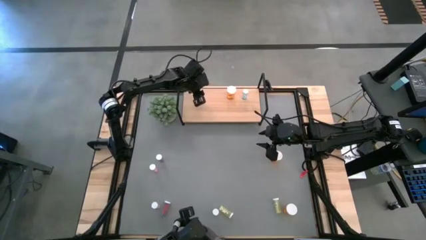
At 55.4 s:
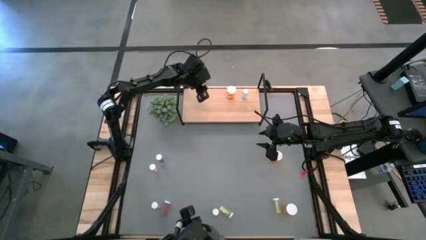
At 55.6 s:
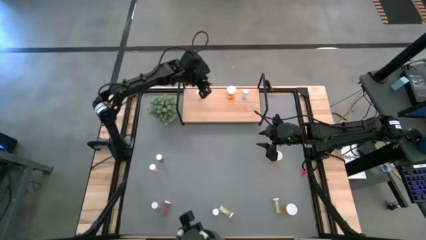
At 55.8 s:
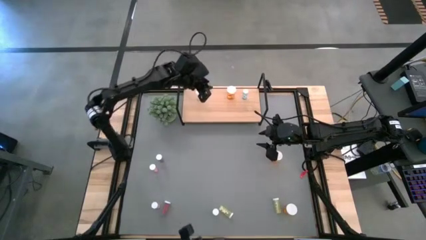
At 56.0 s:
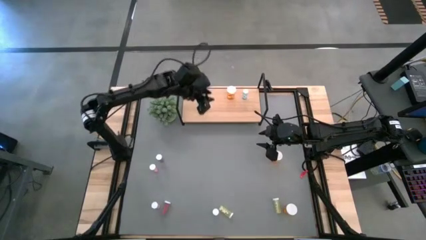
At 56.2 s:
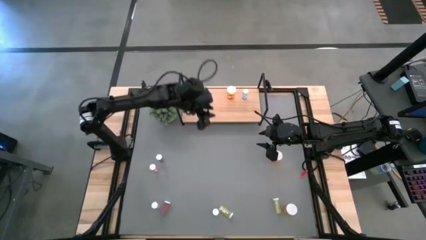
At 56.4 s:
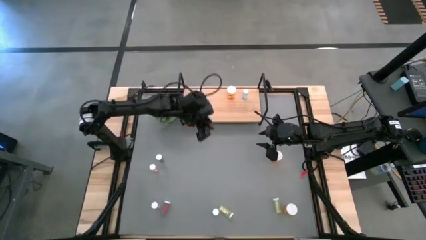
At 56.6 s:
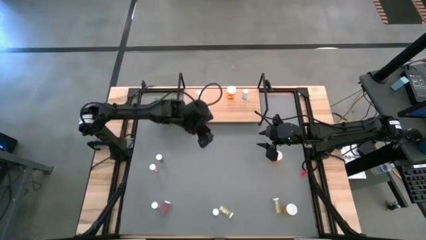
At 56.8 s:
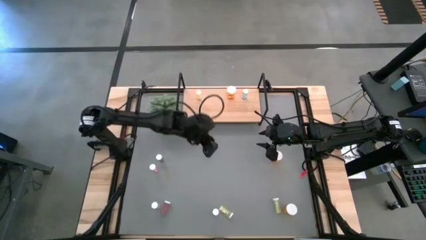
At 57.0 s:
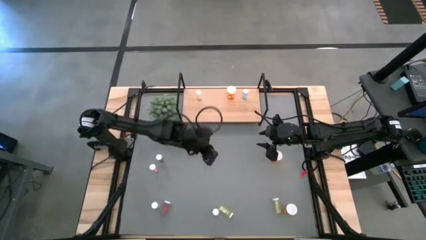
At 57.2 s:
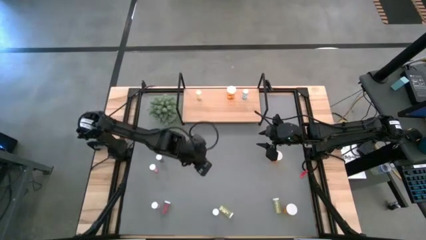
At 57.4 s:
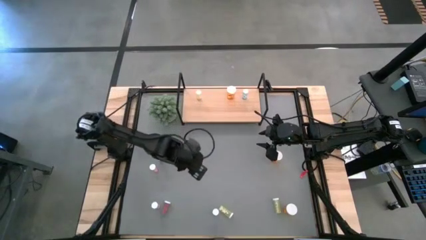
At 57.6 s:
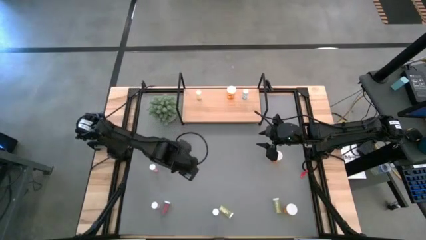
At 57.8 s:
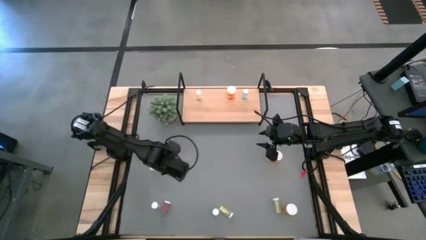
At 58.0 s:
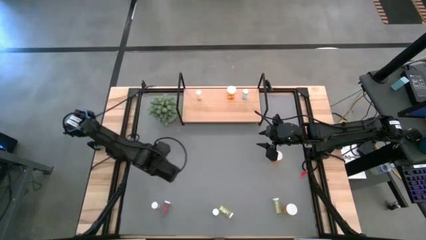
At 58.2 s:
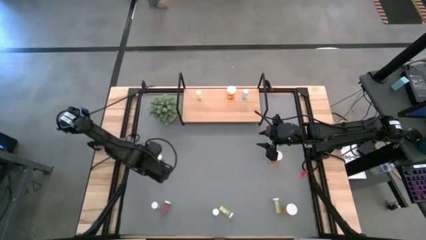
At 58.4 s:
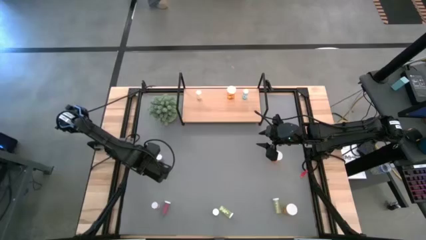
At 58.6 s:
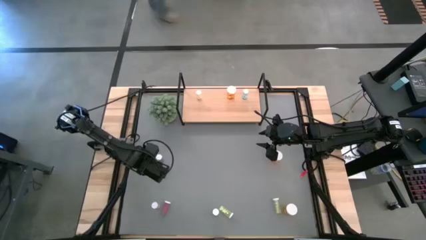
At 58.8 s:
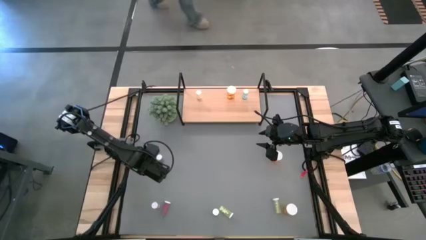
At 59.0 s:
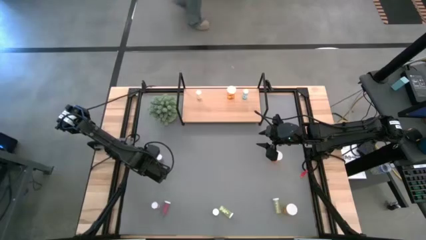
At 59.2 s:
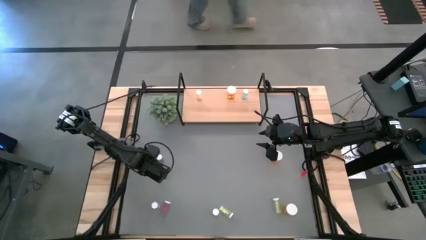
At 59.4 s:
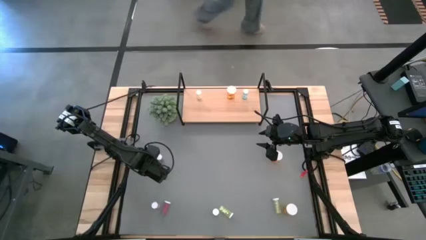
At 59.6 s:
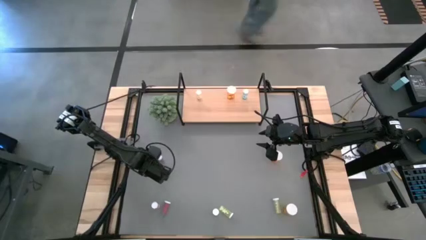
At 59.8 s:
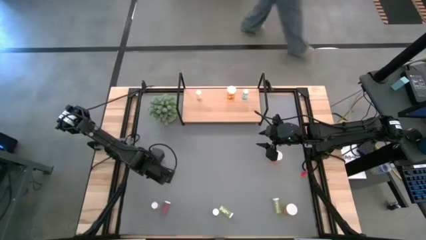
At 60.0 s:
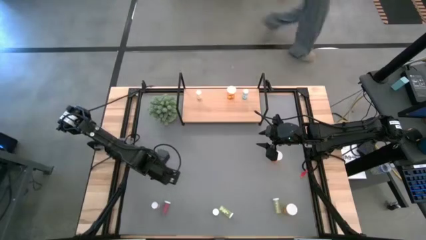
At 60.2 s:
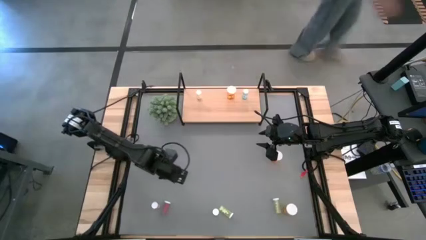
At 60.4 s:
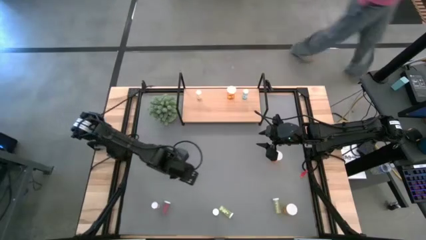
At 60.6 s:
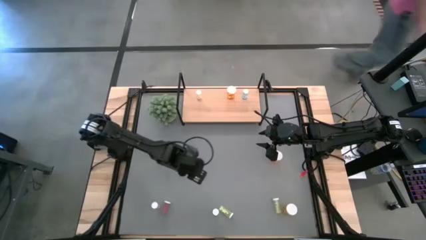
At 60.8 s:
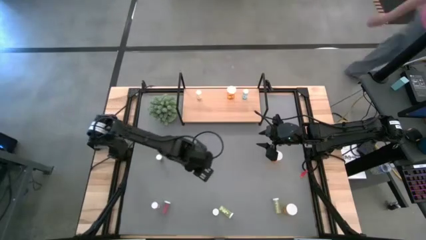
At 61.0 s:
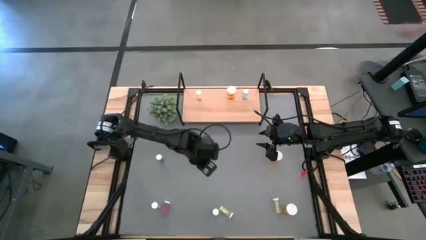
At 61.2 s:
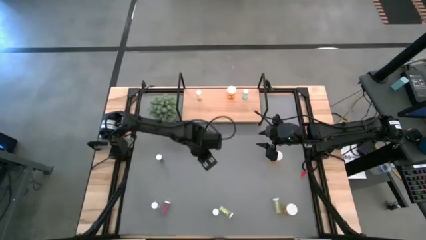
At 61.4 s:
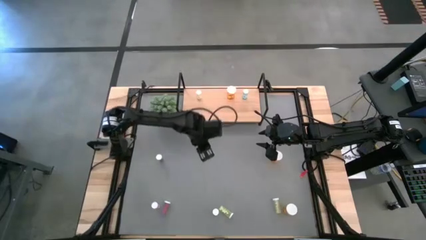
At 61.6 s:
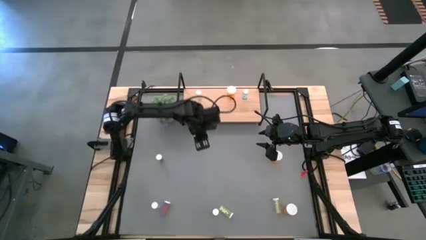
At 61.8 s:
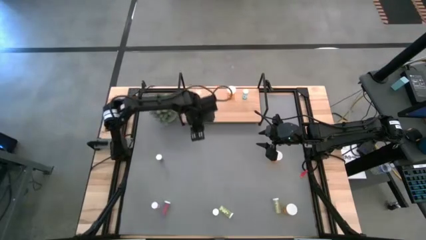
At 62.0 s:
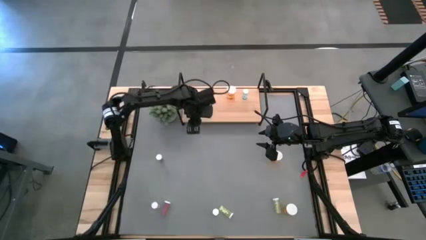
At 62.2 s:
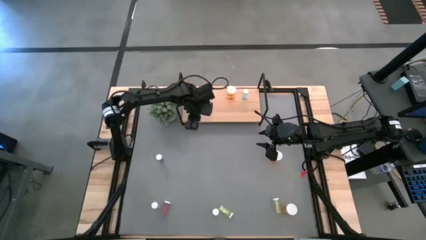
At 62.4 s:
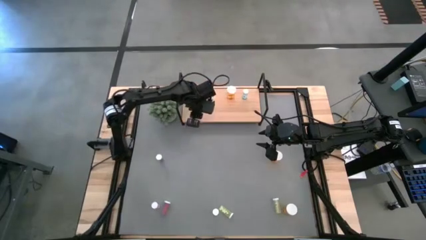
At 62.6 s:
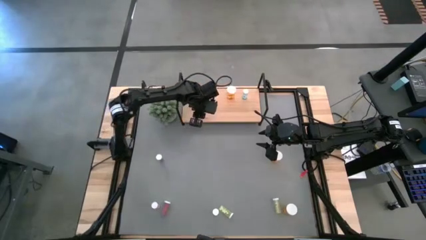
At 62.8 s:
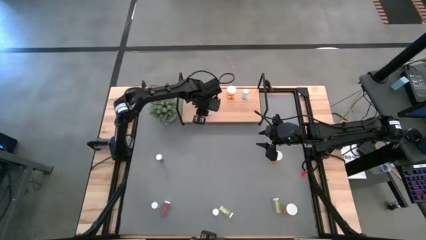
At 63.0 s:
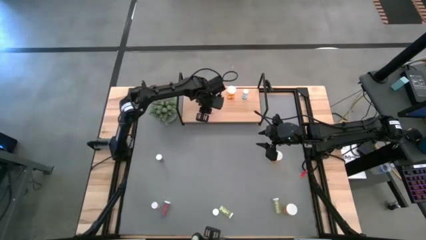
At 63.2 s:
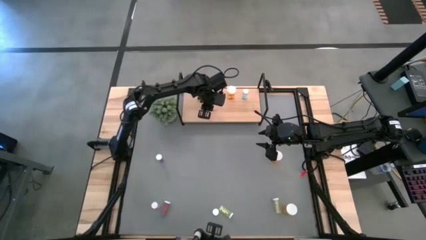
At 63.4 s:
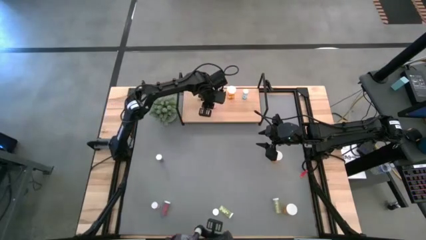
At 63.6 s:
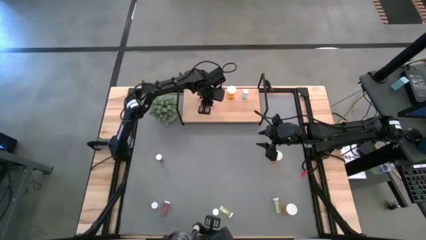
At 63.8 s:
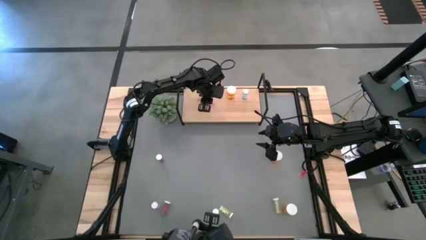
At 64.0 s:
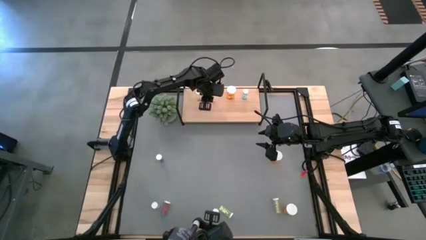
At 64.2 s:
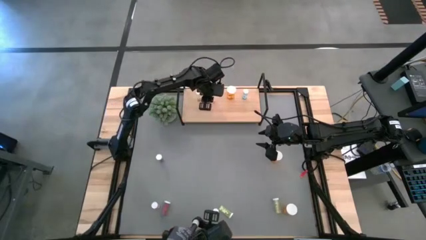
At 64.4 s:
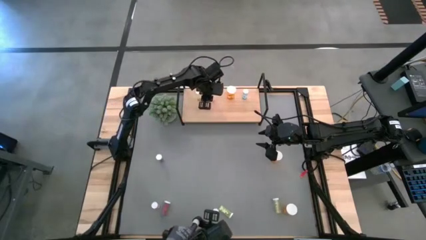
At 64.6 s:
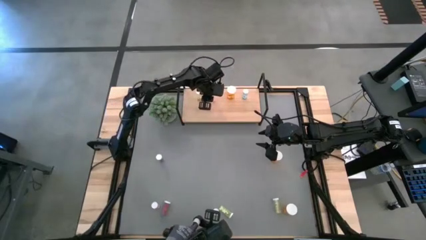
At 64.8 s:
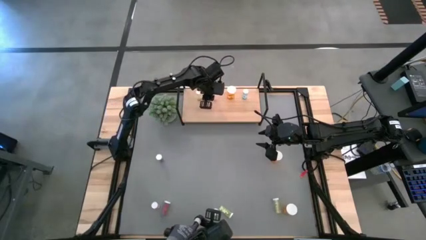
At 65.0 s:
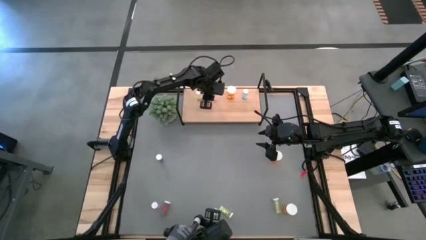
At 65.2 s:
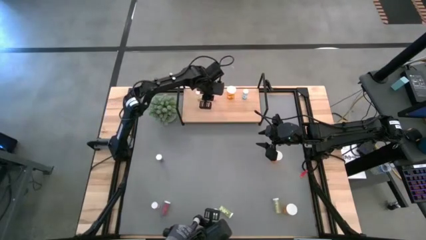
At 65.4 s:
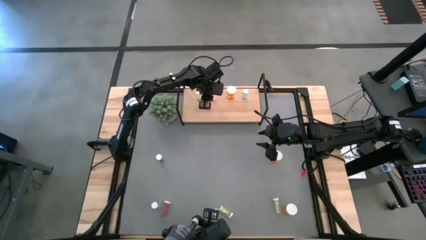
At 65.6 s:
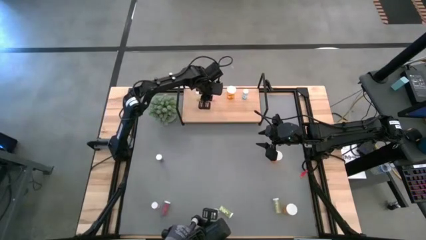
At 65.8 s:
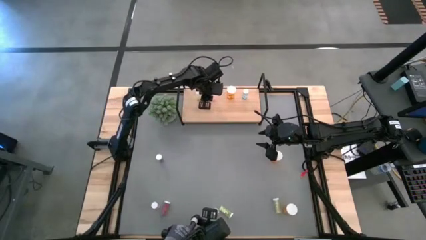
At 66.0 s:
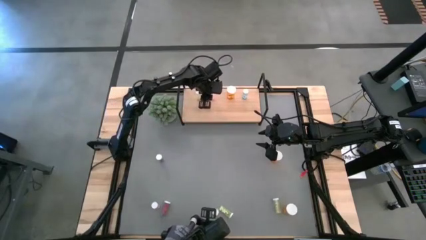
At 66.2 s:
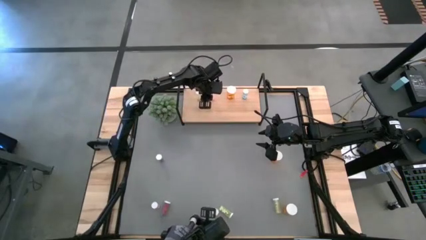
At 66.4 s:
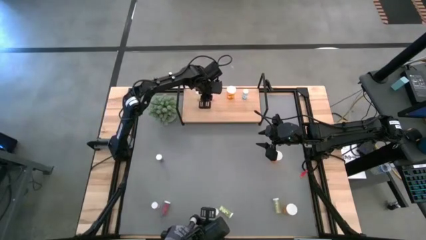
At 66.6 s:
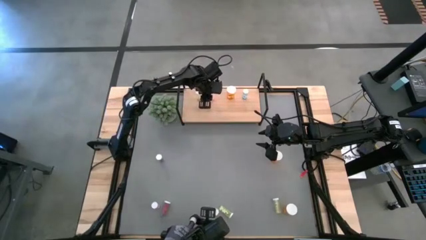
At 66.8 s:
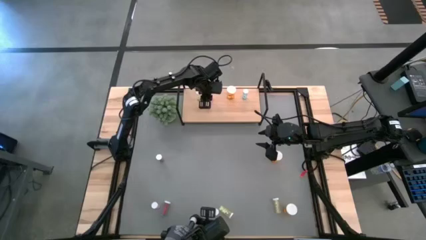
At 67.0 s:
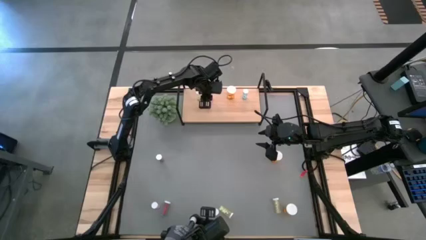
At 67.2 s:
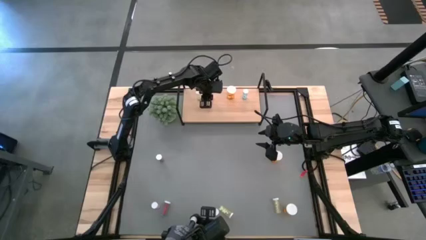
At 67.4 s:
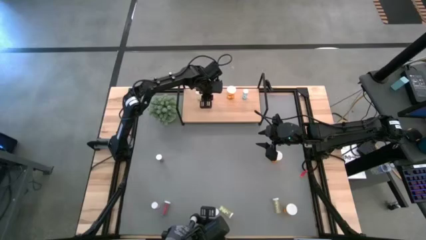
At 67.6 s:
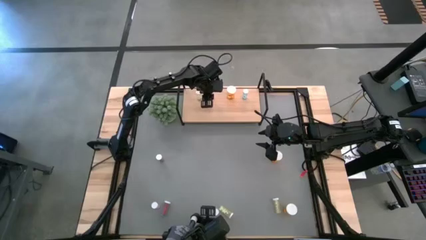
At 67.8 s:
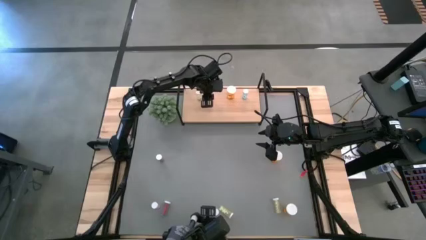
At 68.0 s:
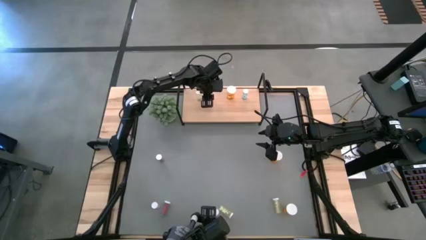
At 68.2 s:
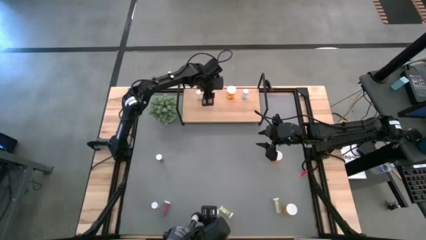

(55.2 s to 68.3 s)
Task: Pick and place medicine bottles onto shelf by color
Put the top pink pill bottle on the shelf

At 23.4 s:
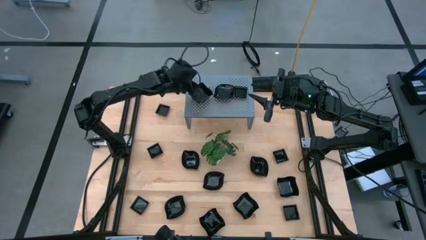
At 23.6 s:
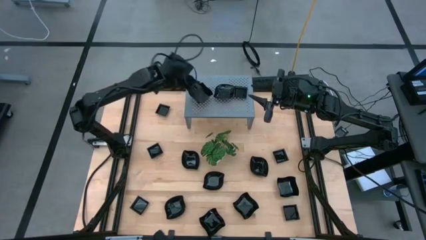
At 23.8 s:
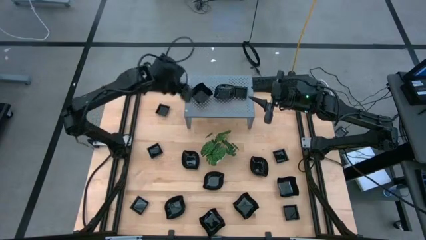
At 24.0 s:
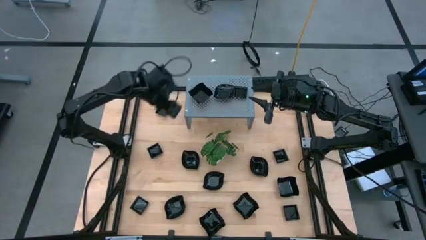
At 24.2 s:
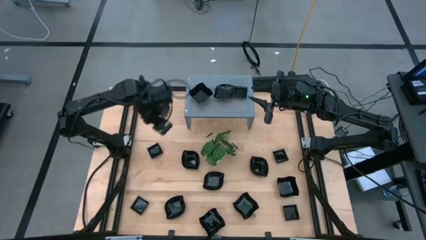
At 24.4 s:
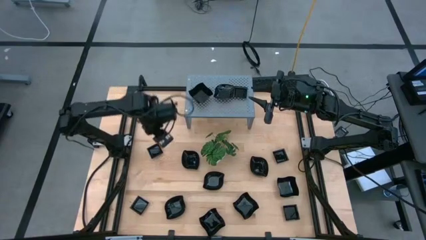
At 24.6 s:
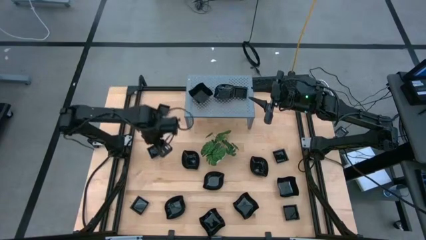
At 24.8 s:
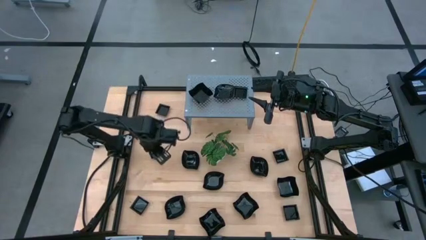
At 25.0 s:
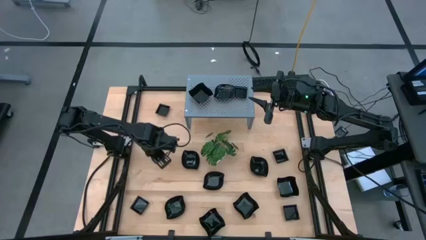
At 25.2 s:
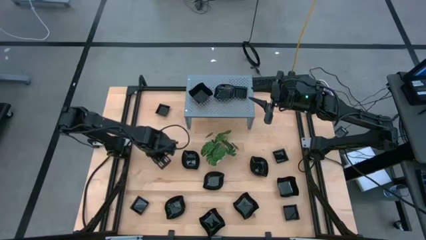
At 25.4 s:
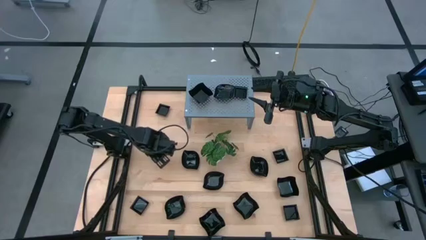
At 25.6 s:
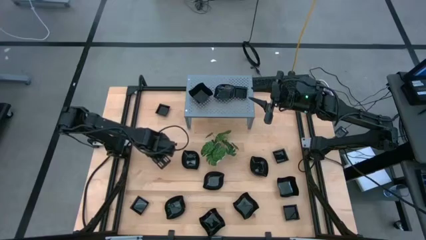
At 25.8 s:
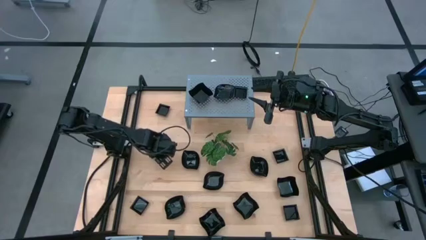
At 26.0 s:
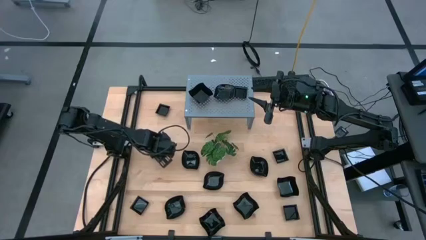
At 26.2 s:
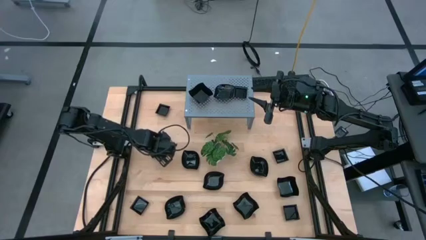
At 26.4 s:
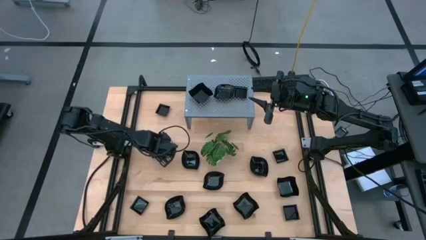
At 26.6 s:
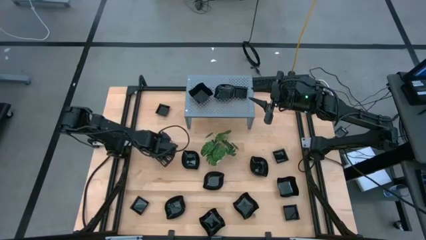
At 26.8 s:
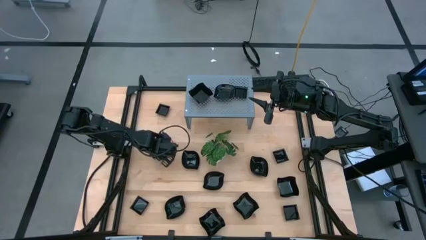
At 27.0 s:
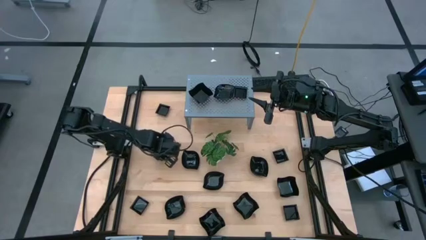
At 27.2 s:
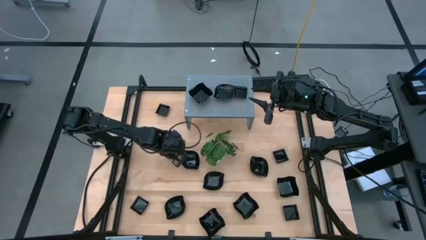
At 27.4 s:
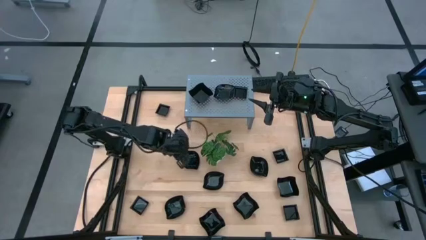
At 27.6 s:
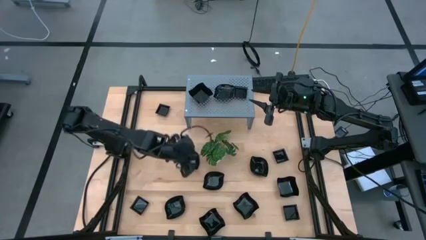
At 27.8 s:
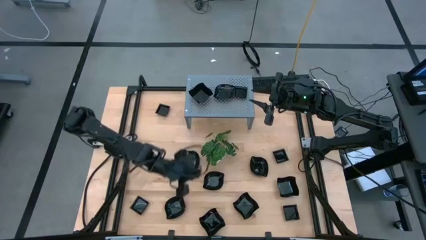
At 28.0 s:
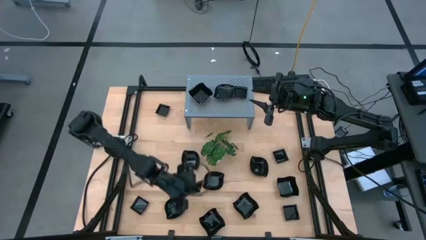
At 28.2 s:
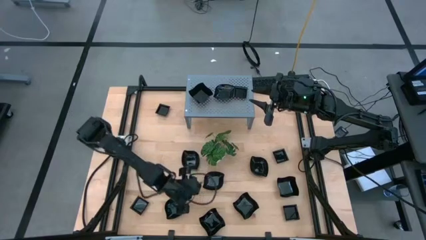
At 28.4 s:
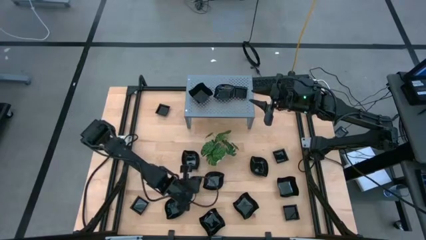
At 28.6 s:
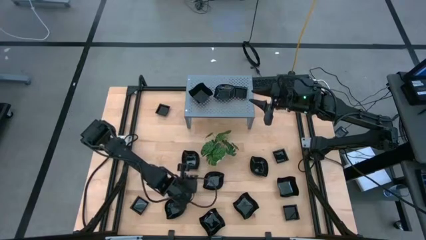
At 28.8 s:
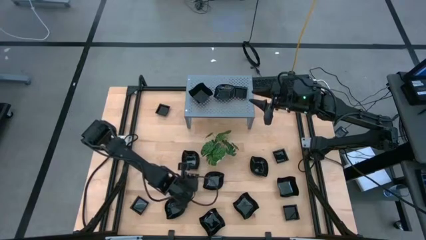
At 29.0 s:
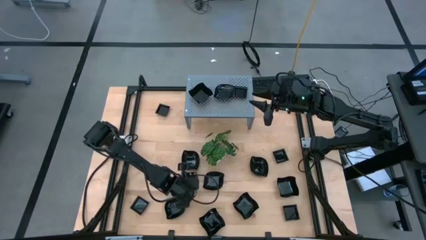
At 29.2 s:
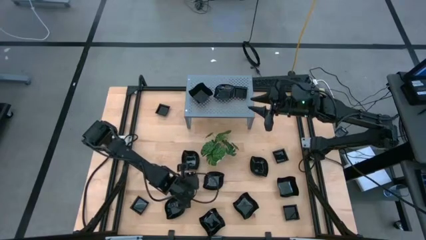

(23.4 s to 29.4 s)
Task: Pick & Place Mini shaped plates
Move the square plate to the middle of the table
